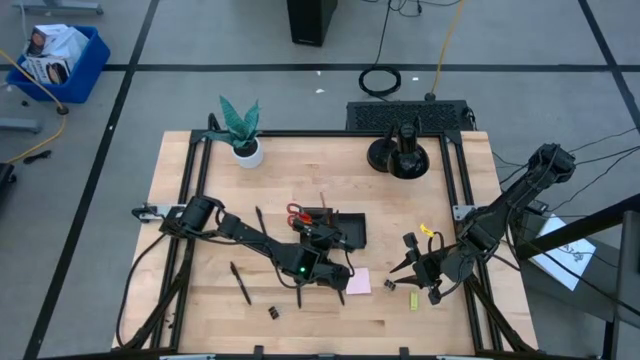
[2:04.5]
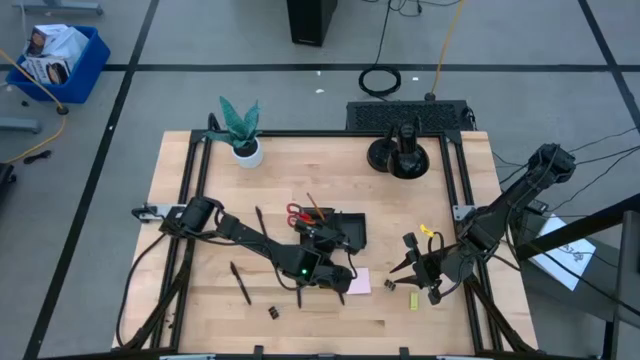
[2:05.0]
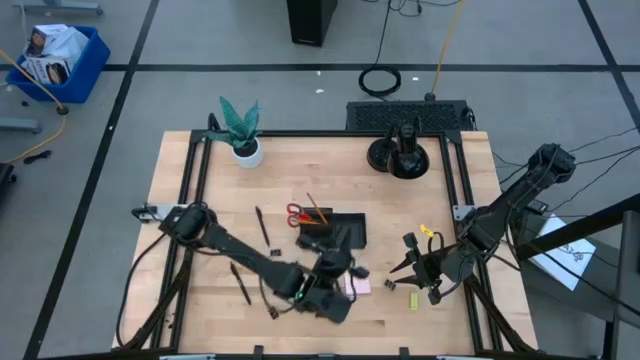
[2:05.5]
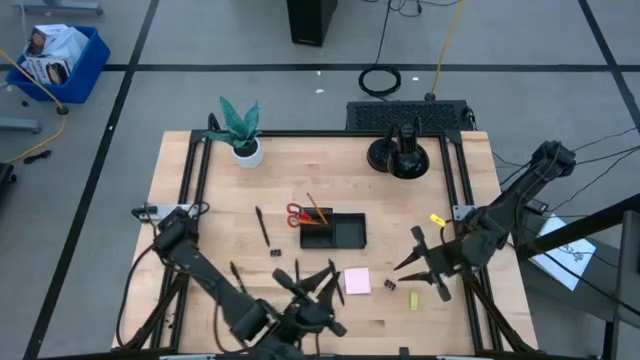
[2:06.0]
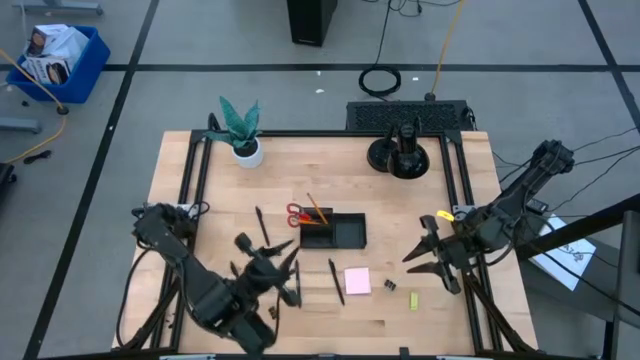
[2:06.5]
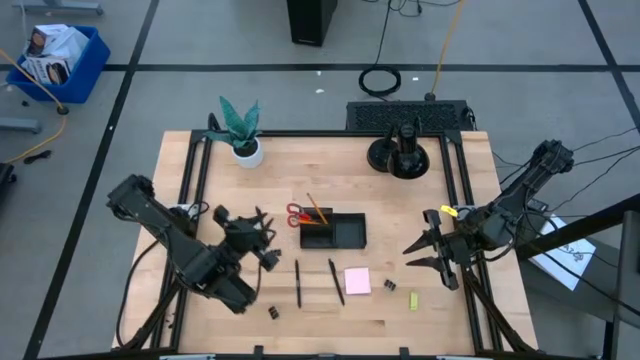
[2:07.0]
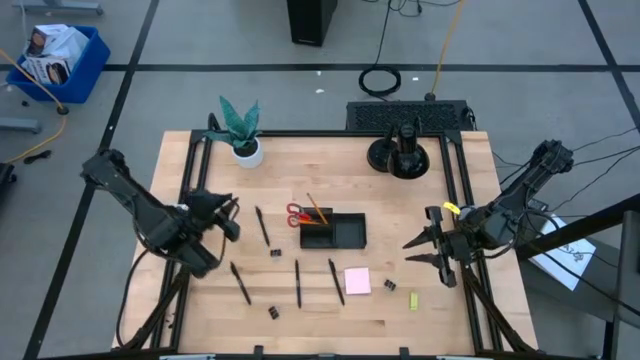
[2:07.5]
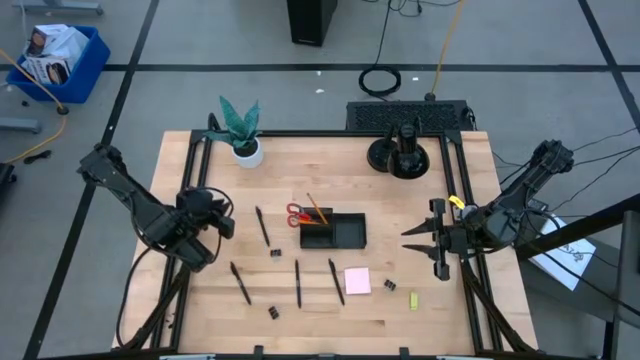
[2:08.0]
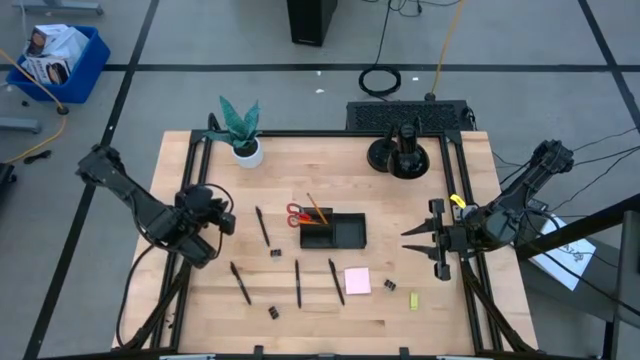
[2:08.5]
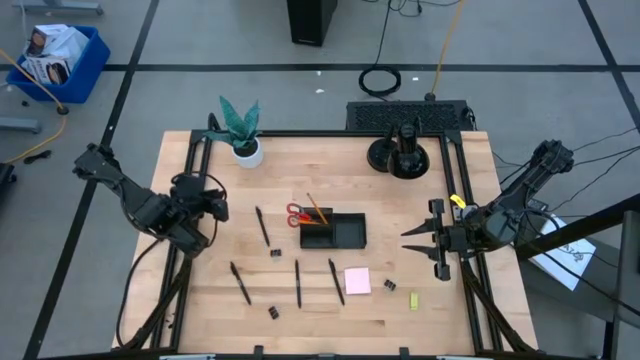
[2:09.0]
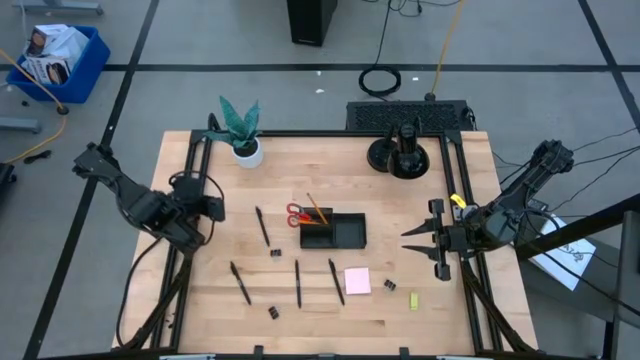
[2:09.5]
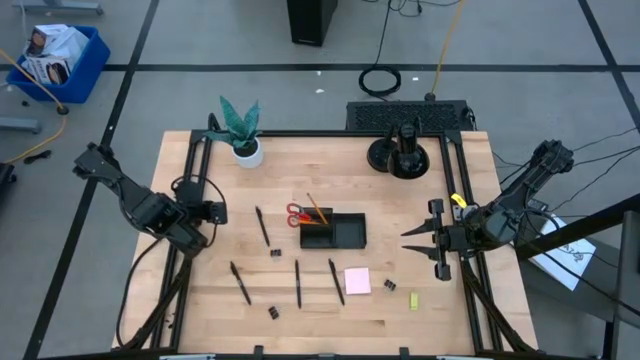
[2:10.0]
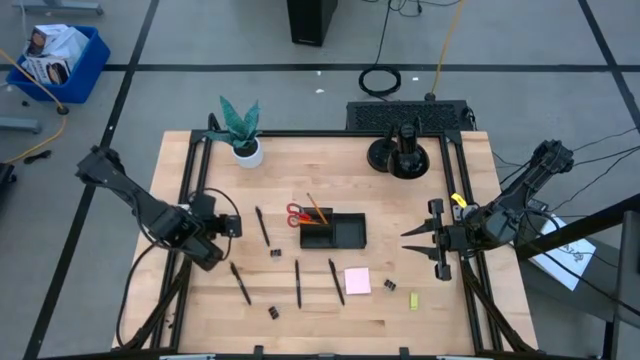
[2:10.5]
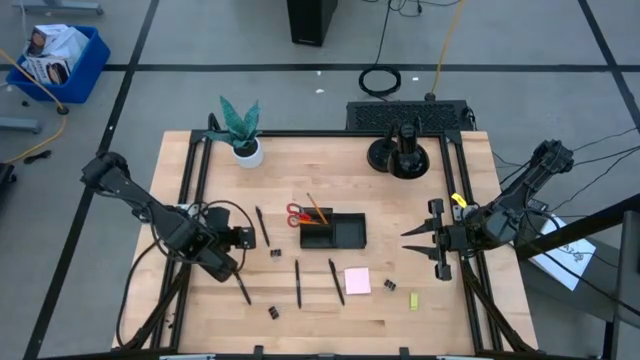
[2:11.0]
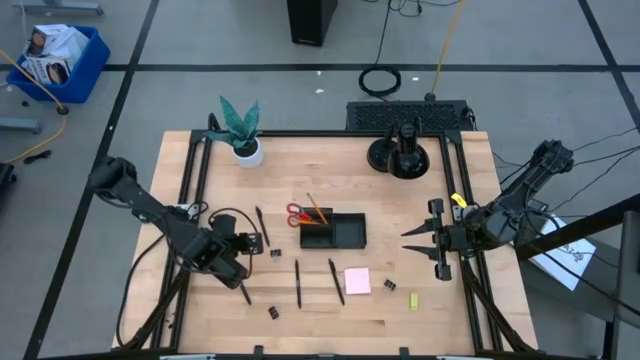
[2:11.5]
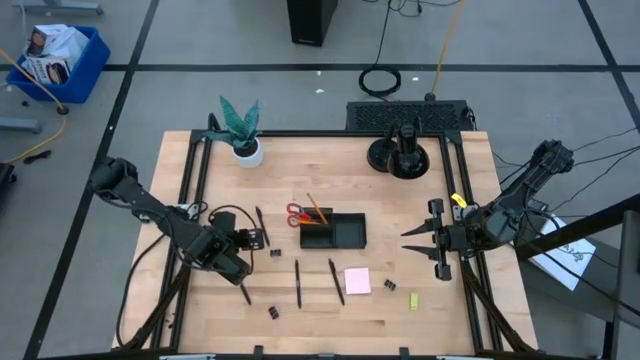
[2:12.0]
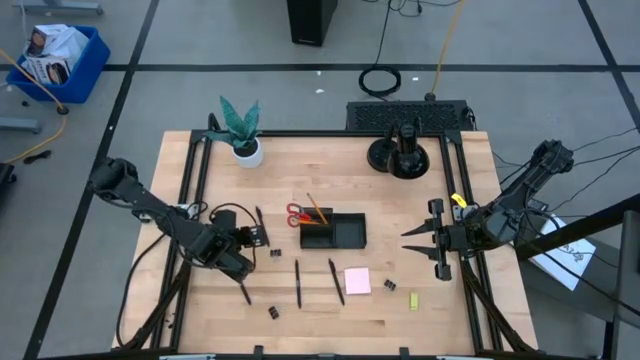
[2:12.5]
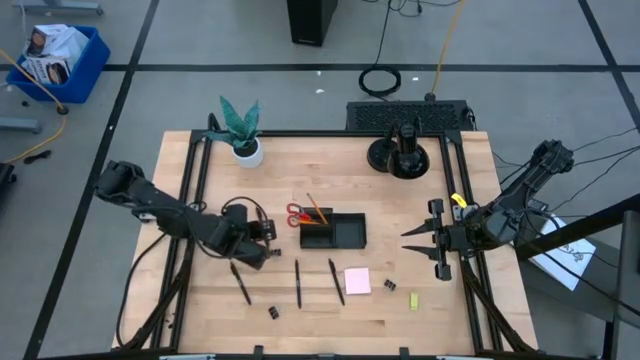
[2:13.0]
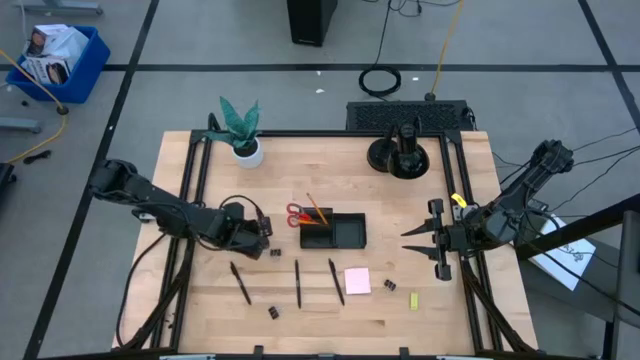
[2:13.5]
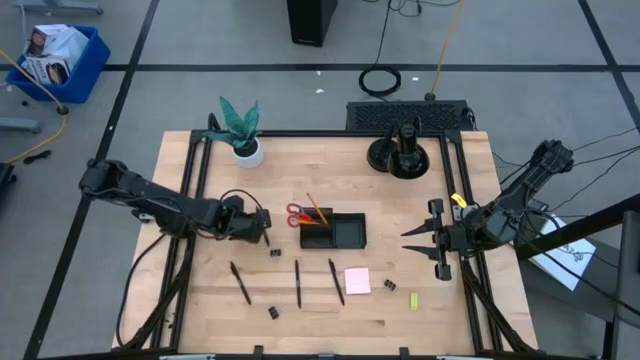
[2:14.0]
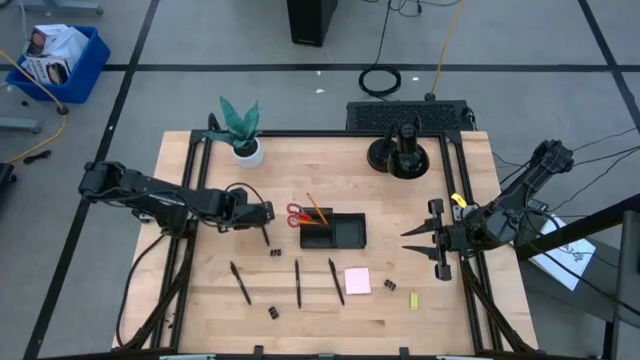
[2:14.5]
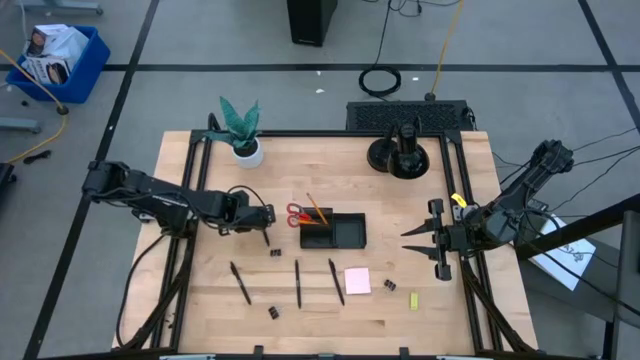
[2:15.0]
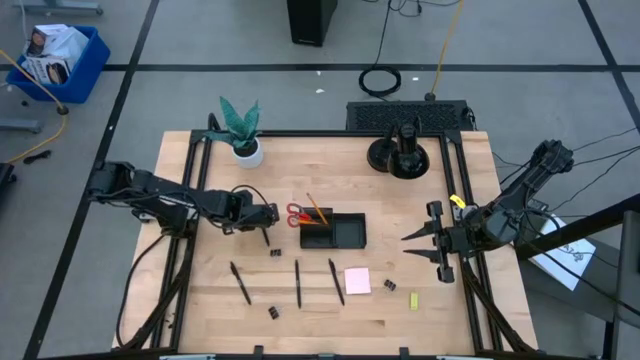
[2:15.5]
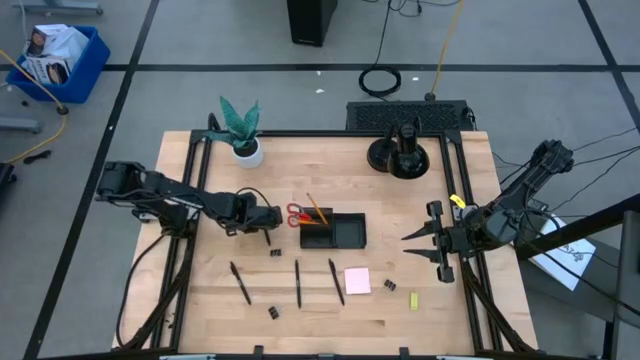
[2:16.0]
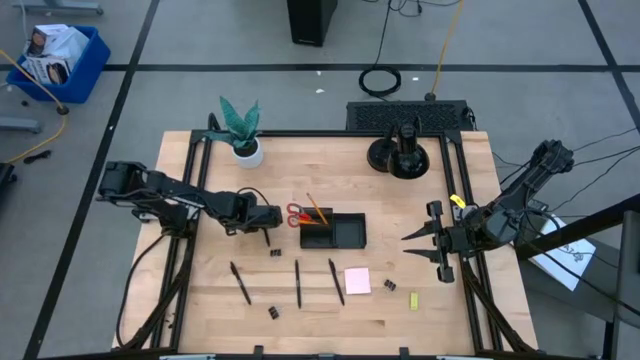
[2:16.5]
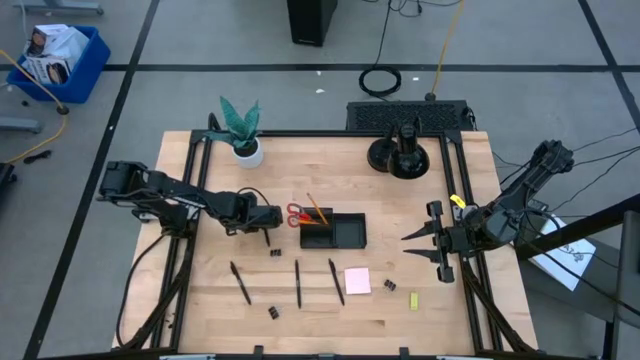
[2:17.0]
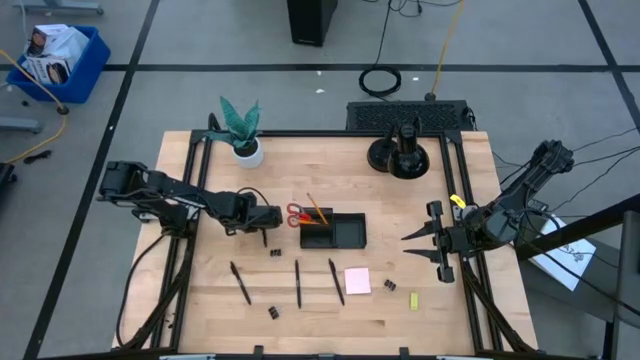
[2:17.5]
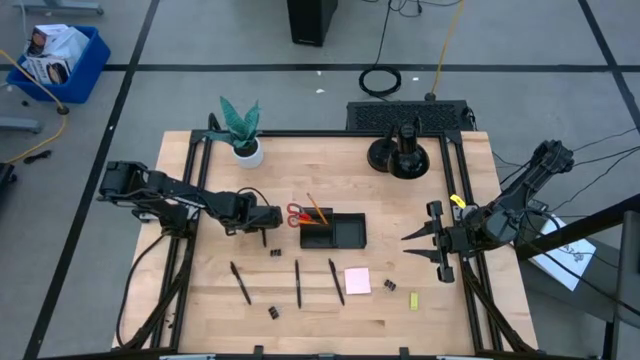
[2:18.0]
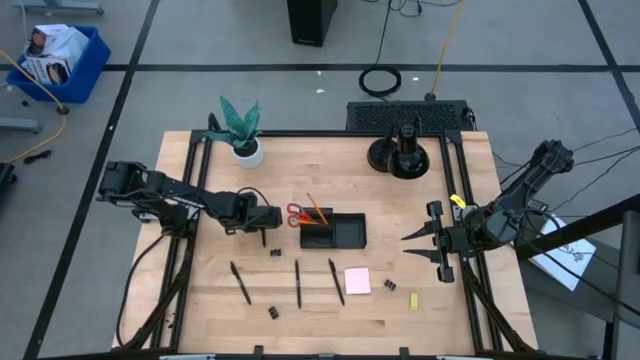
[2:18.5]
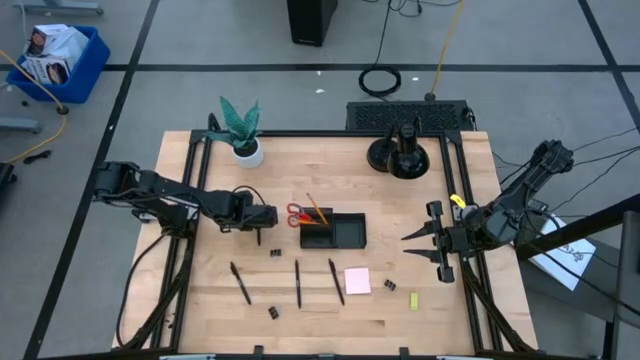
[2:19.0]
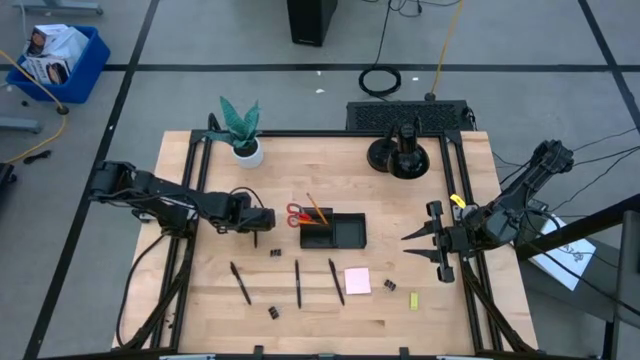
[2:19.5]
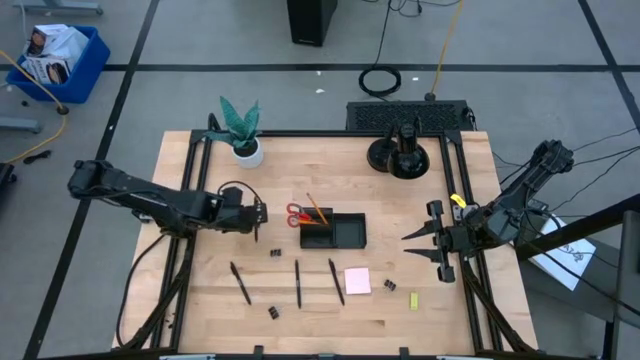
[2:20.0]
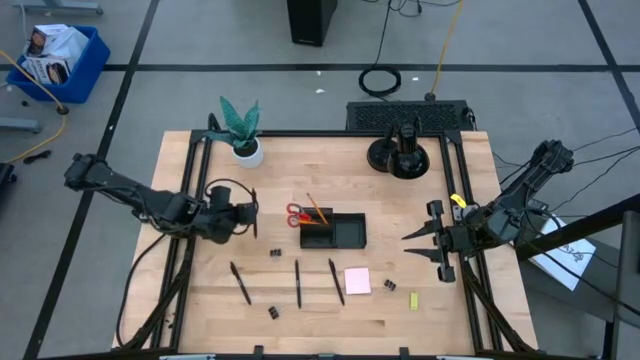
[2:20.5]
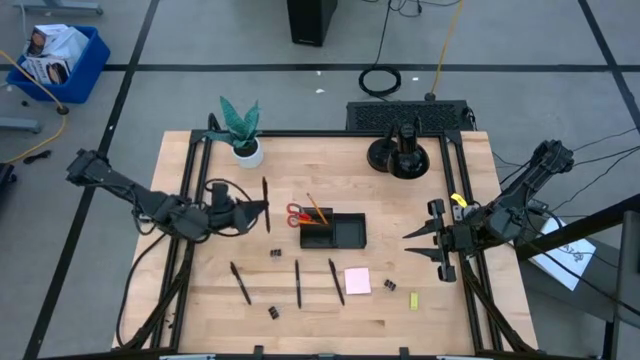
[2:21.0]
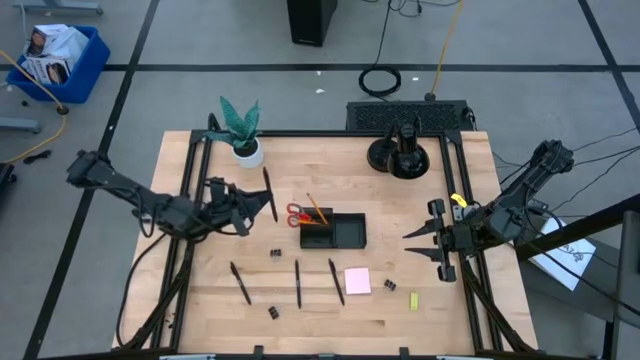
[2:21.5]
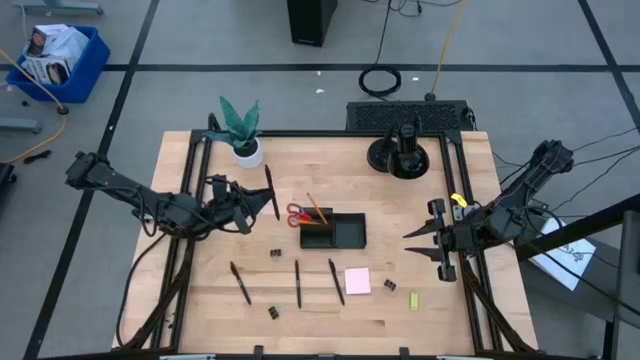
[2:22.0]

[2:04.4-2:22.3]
Task: Pick and place office supplies into organizer
Put the top left black pen into the desk organizer

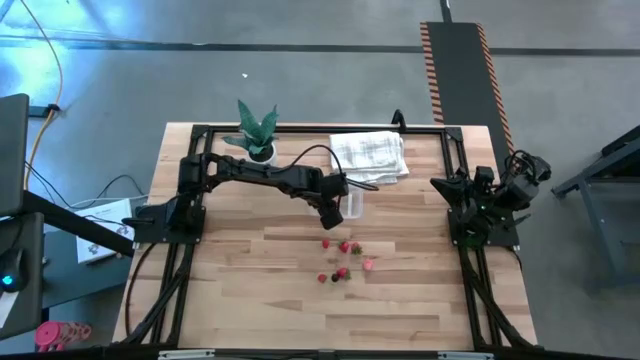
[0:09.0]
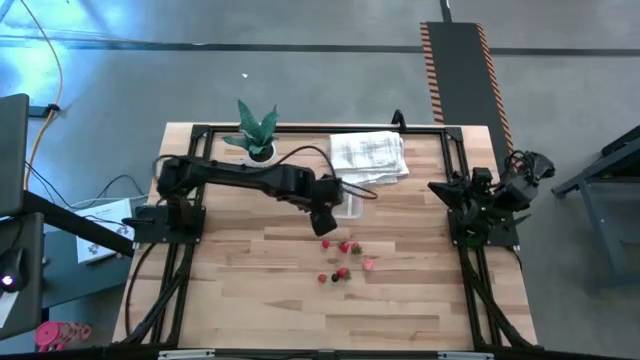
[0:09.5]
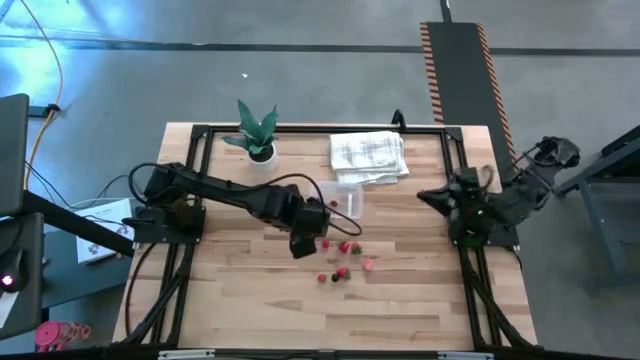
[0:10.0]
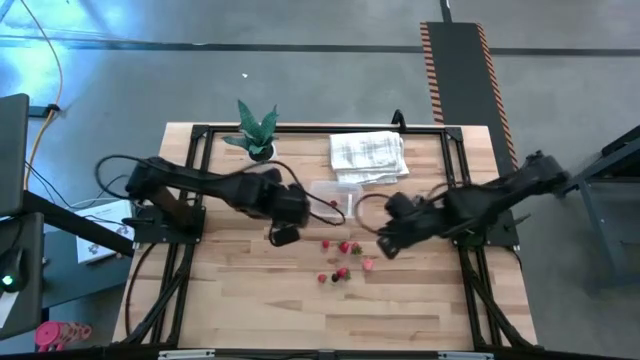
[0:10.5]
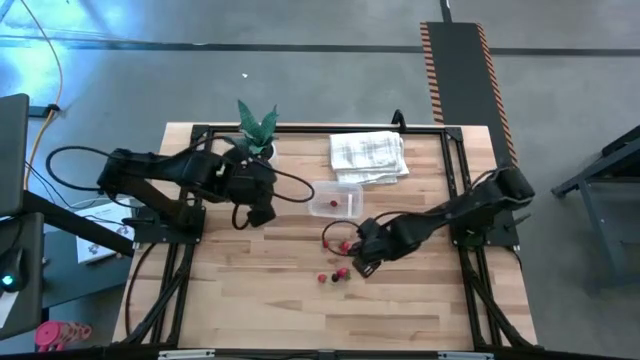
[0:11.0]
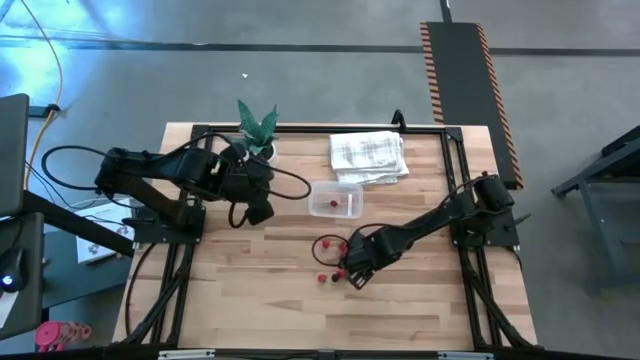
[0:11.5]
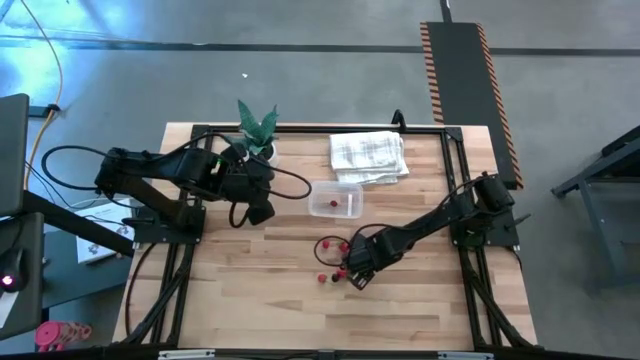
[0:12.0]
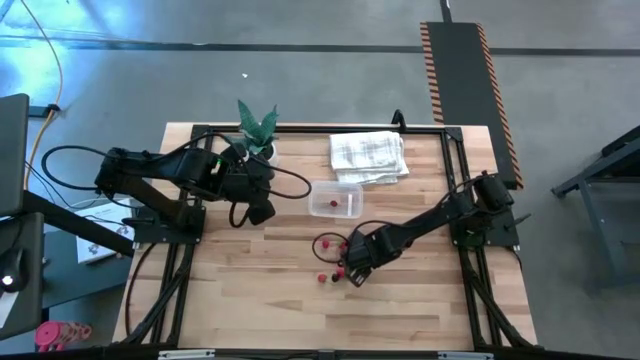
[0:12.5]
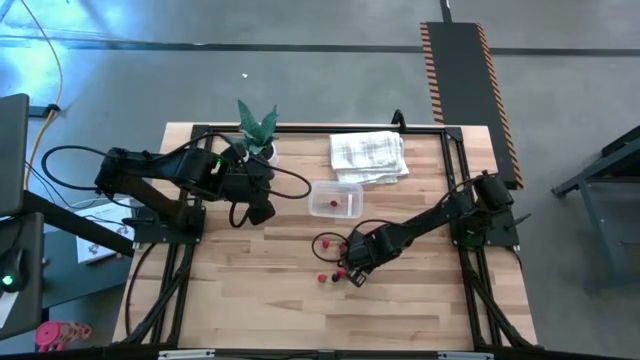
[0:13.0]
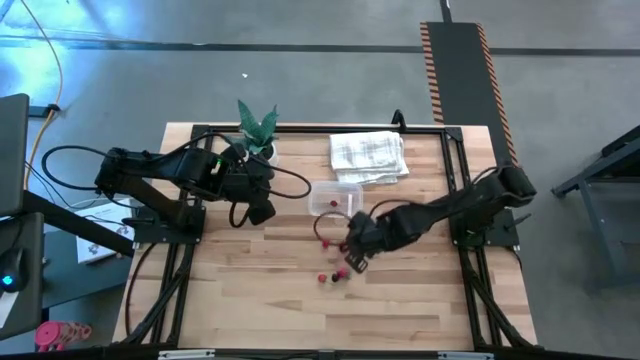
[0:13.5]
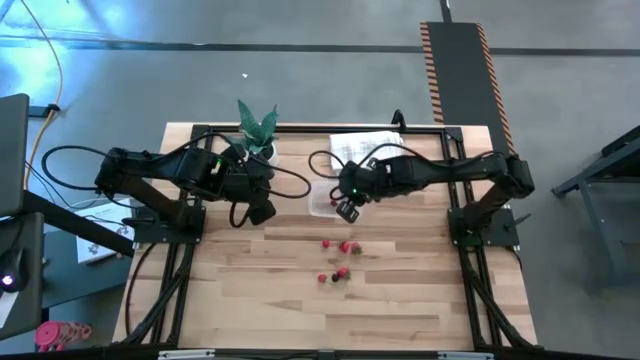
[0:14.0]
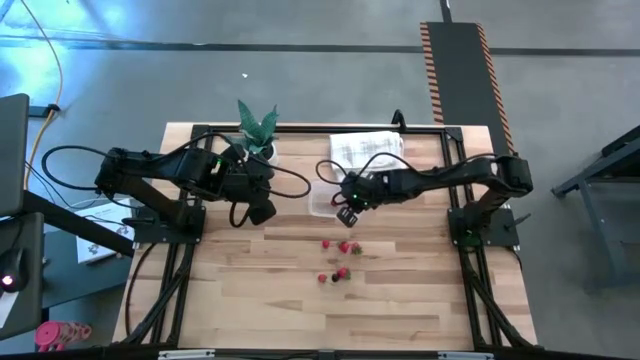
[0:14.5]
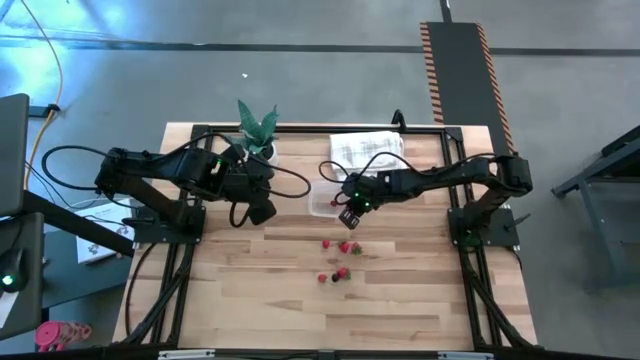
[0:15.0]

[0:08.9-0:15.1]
Task: Pick and placing Produce into tupperware
Put the peach into the transparent bin
